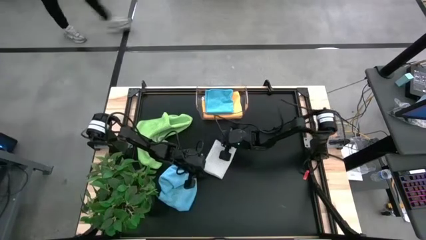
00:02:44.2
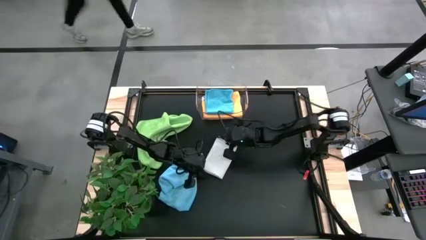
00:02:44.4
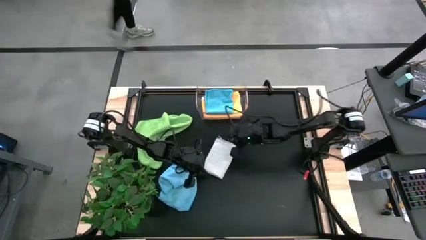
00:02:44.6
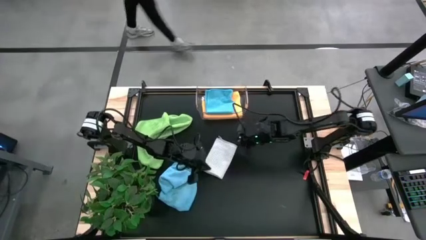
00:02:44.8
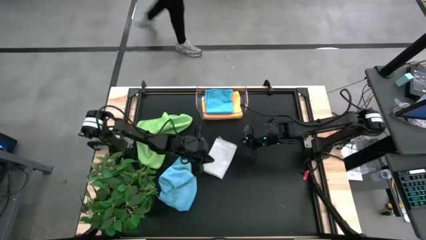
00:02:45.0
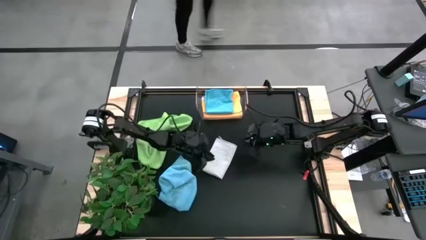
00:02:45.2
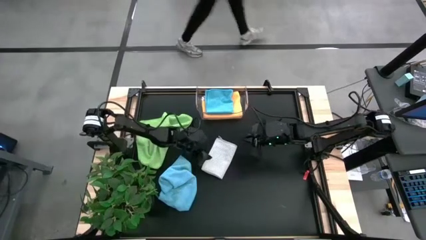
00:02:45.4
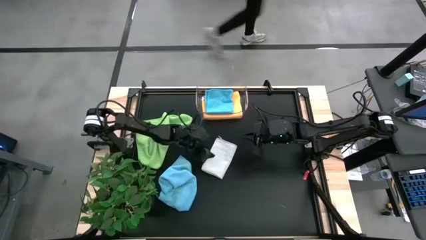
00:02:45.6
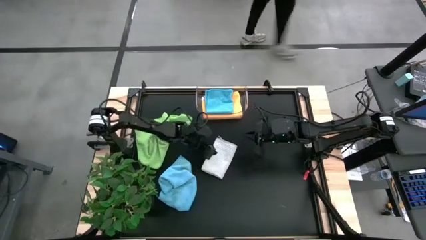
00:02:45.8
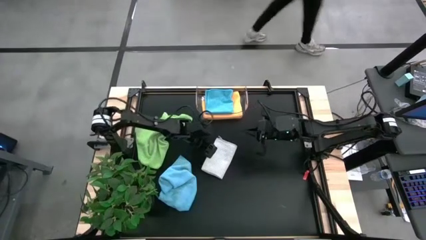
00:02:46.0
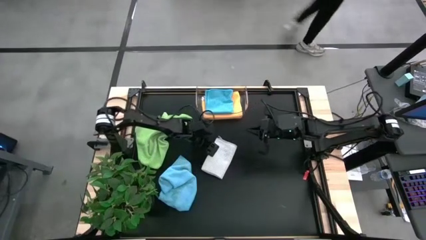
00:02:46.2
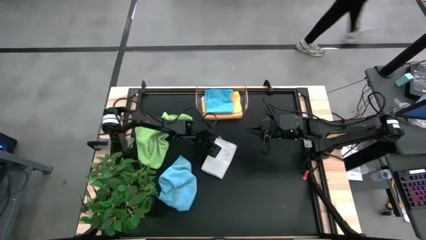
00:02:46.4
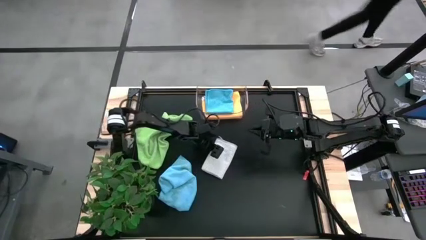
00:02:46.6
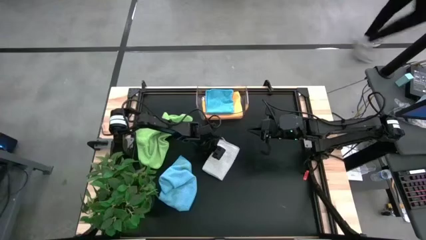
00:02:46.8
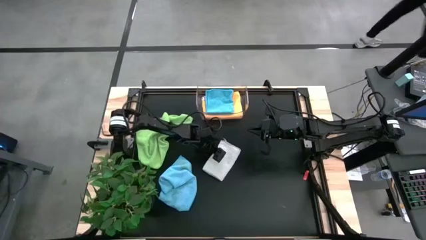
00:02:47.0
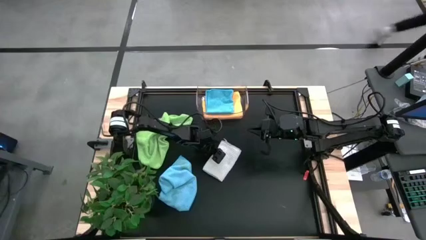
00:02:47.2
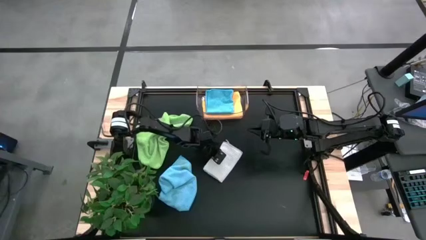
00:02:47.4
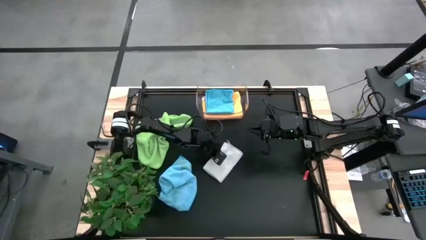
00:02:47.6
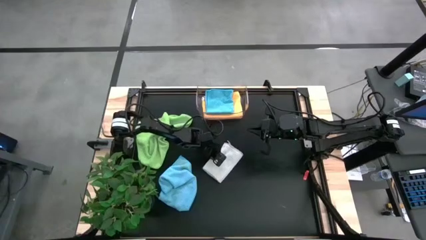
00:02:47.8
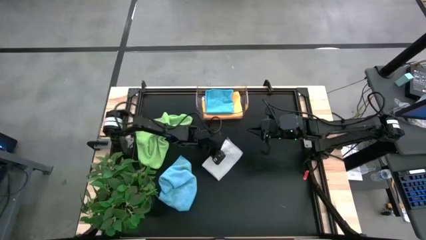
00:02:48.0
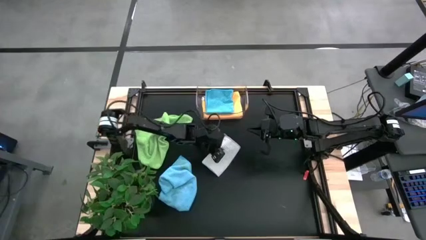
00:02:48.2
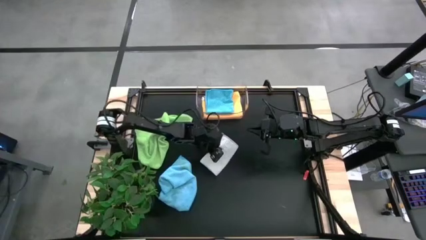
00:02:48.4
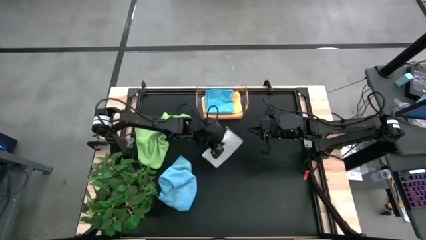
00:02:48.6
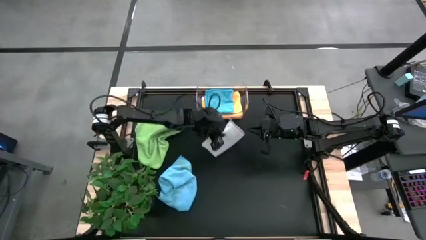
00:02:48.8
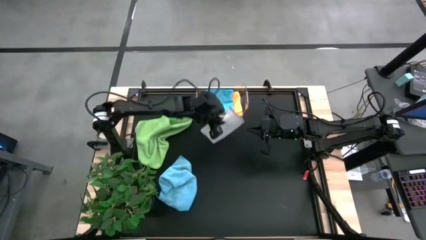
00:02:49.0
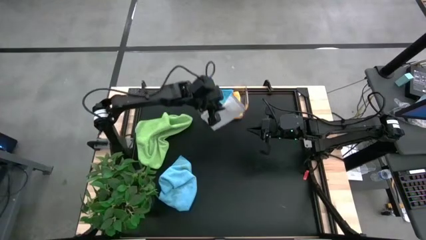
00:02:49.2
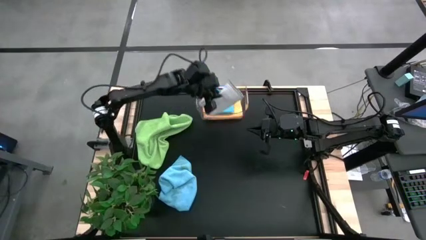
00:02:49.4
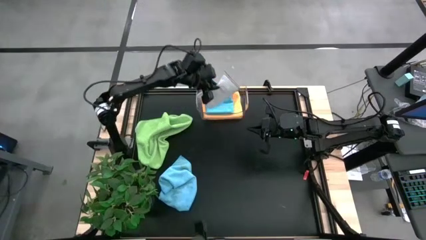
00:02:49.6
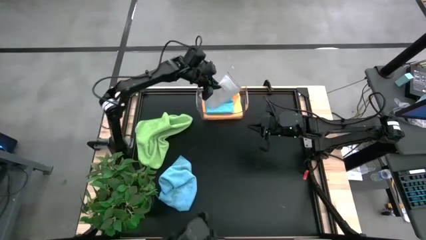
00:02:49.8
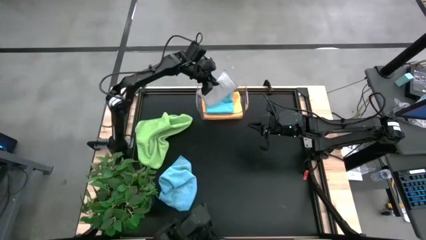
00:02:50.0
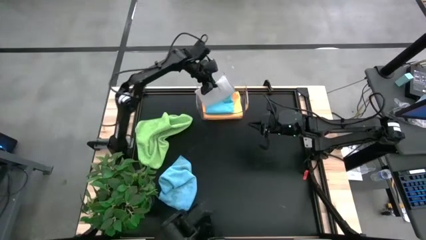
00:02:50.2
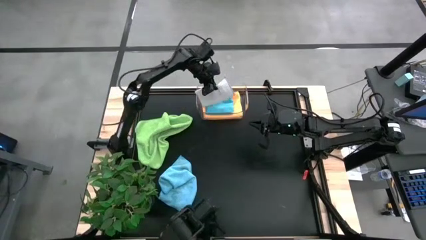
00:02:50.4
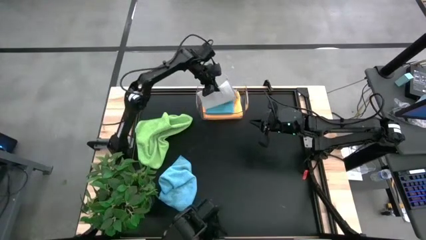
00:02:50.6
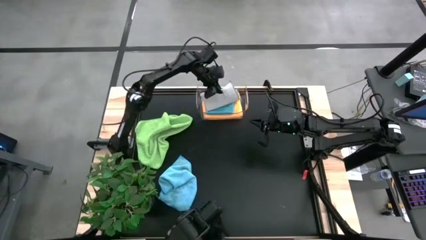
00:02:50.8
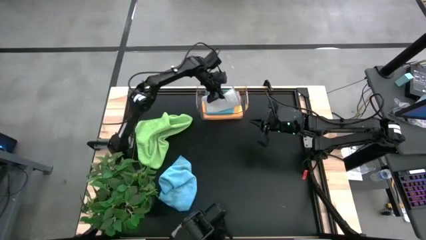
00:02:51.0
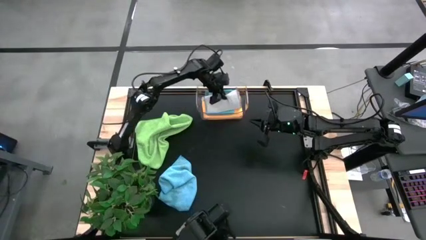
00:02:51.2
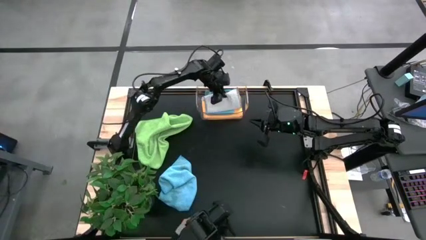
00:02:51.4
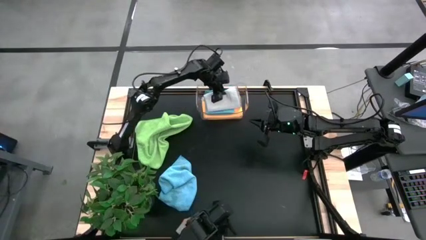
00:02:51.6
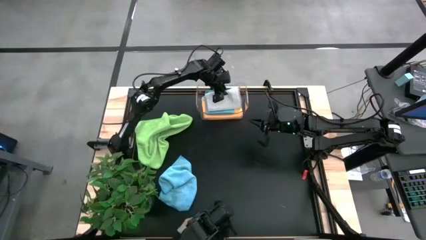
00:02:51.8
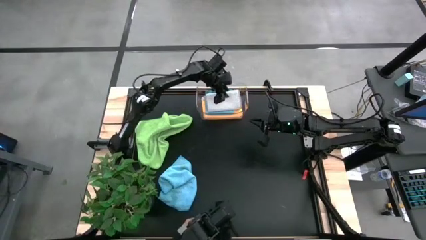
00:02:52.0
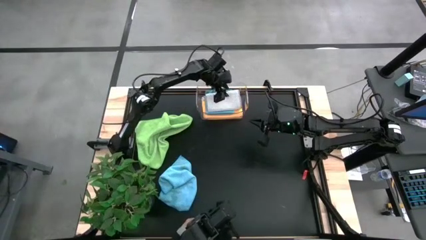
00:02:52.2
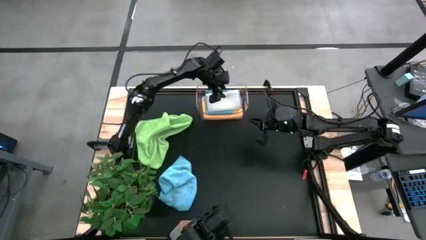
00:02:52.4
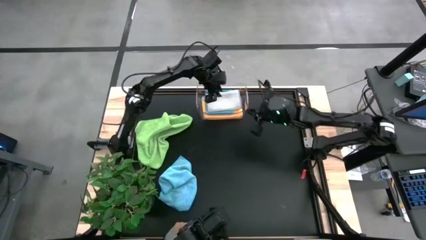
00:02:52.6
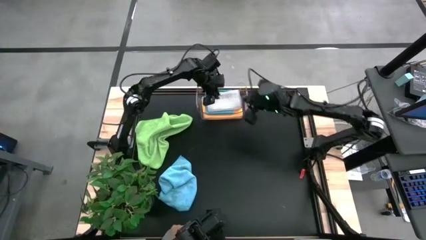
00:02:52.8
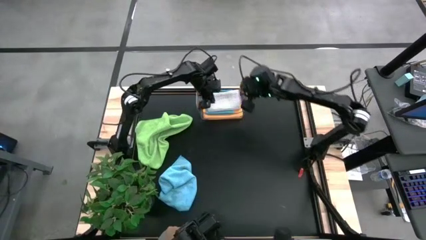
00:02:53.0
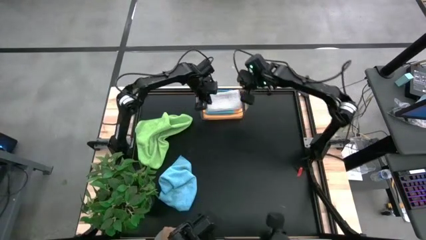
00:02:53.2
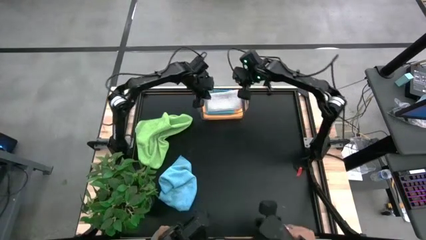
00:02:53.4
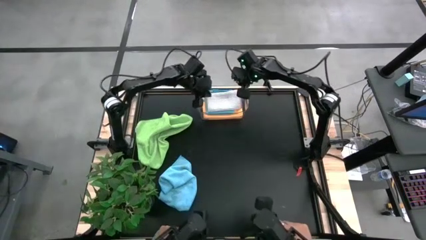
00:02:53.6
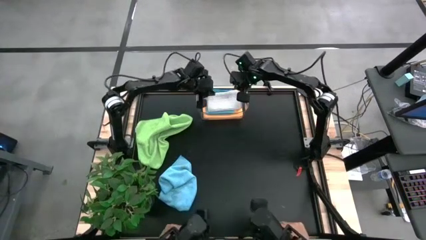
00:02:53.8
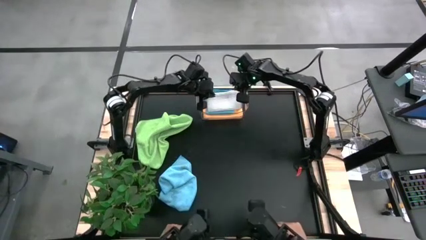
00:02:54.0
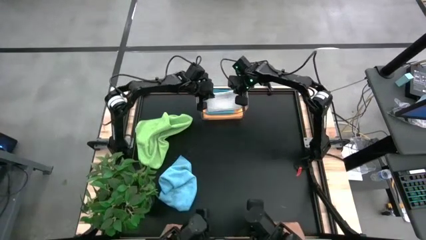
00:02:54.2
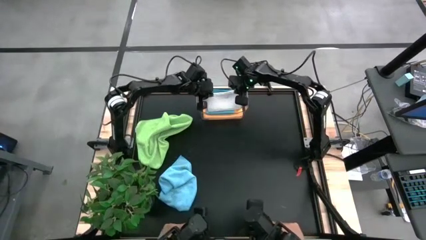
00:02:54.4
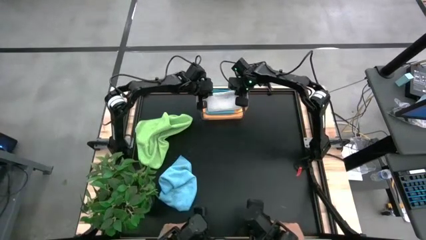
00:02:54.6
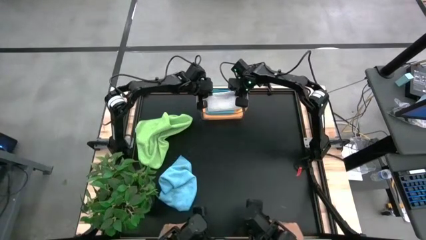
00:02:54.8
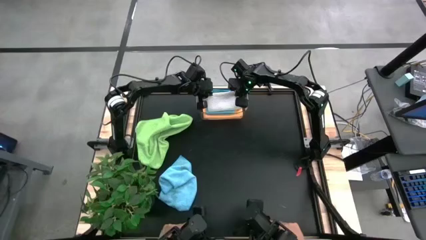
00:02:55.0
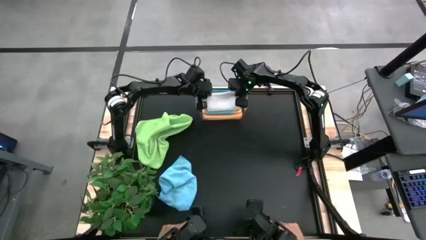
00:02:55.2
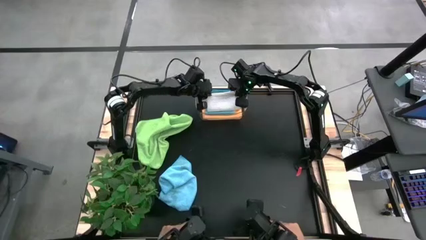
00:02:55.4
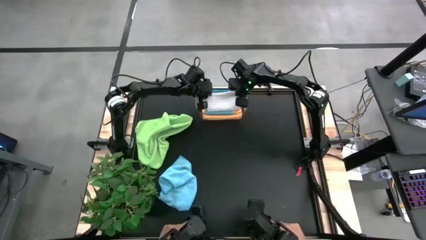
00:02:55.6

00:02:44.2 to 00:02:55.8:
Task: Fold microfiber towels
Put the gray microfiber cloth into the transparent bin

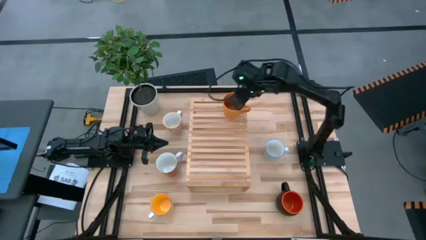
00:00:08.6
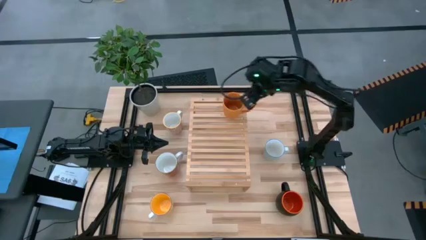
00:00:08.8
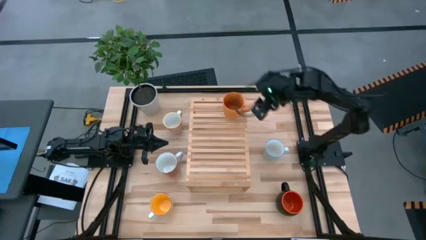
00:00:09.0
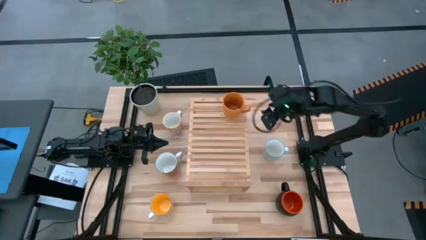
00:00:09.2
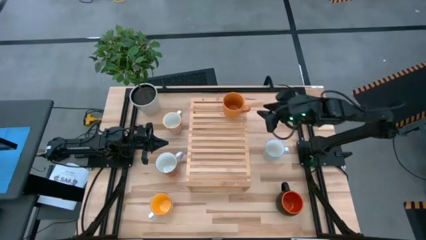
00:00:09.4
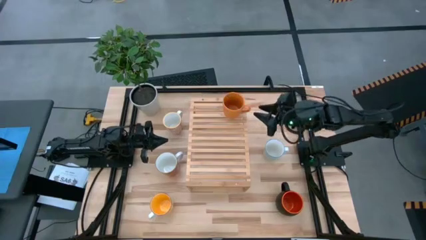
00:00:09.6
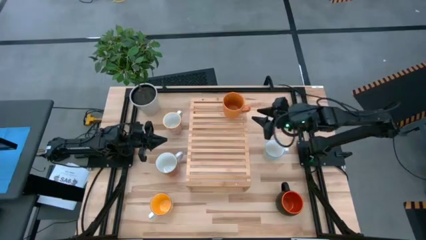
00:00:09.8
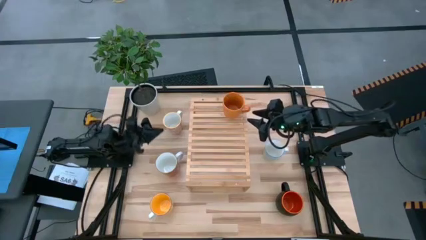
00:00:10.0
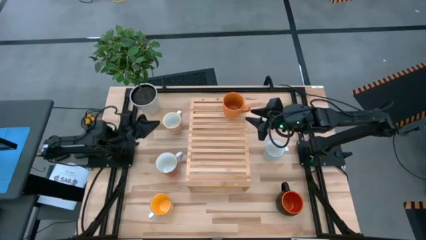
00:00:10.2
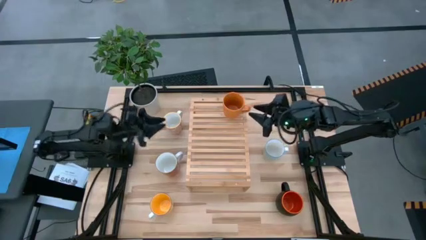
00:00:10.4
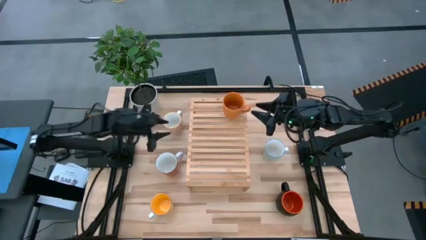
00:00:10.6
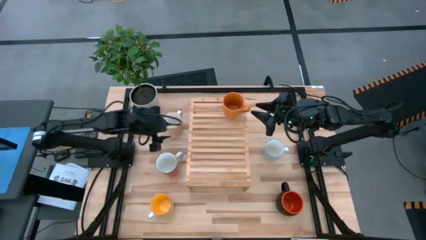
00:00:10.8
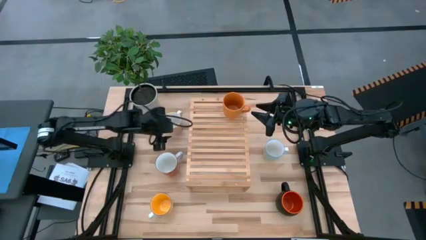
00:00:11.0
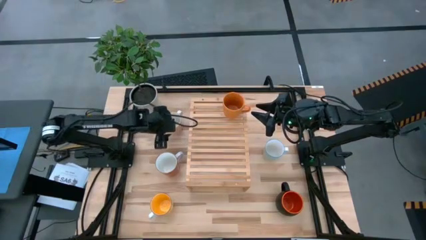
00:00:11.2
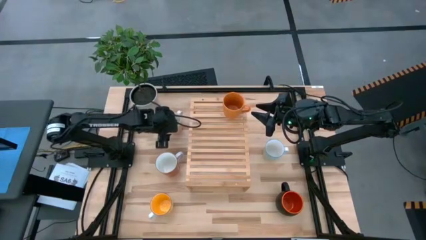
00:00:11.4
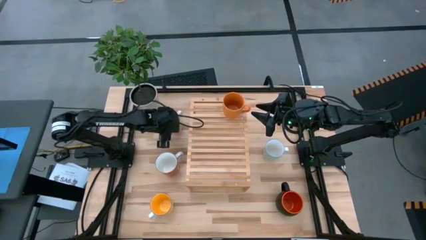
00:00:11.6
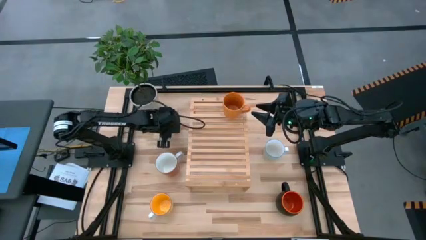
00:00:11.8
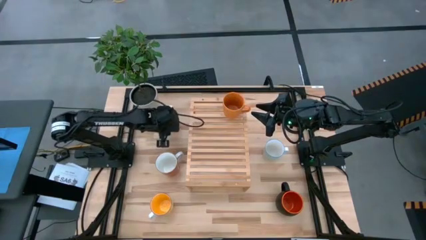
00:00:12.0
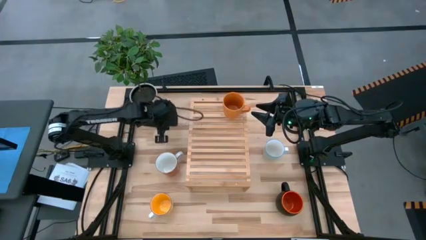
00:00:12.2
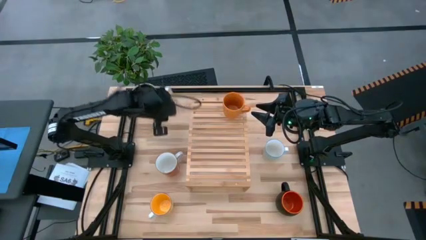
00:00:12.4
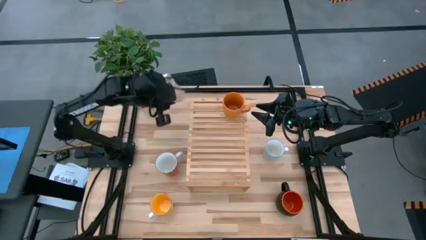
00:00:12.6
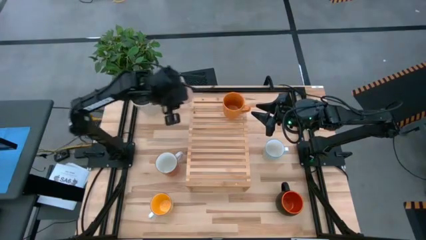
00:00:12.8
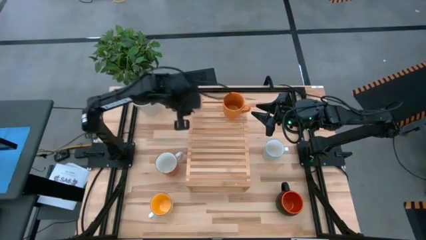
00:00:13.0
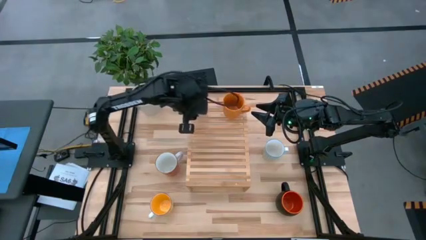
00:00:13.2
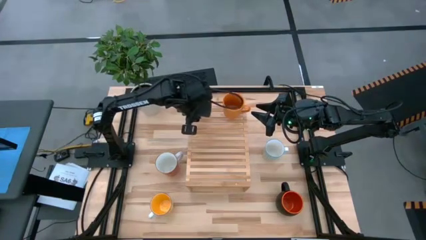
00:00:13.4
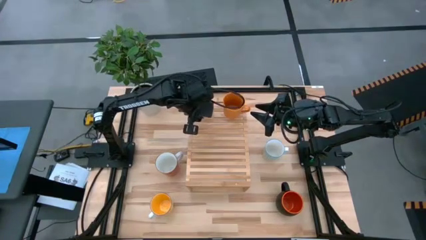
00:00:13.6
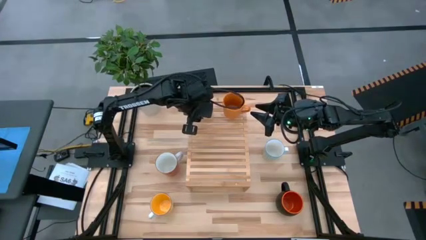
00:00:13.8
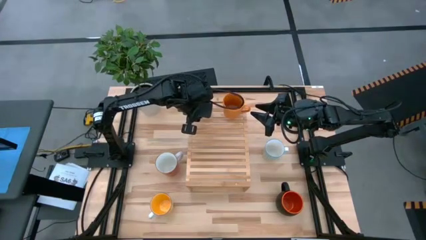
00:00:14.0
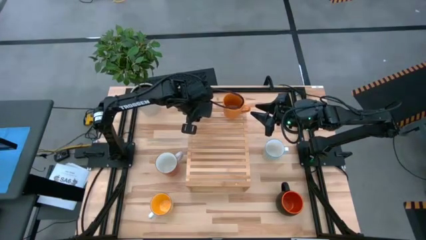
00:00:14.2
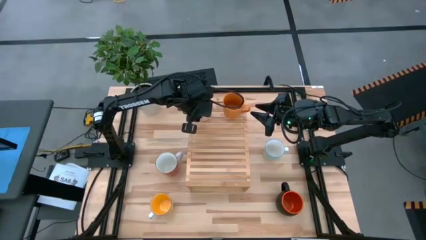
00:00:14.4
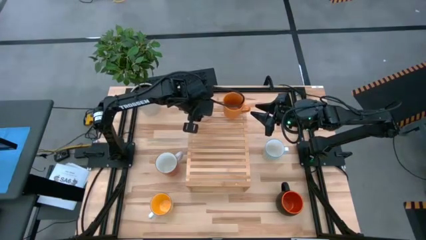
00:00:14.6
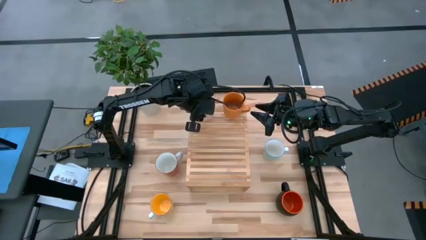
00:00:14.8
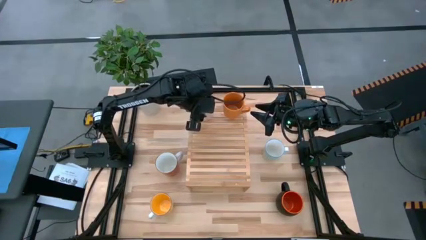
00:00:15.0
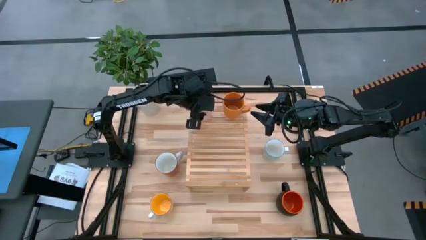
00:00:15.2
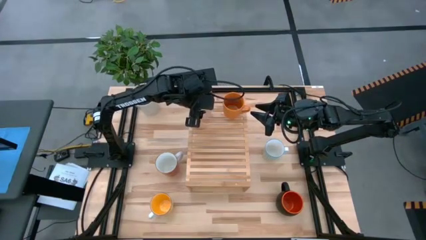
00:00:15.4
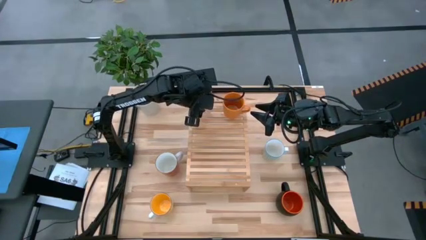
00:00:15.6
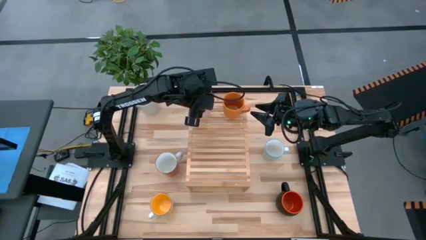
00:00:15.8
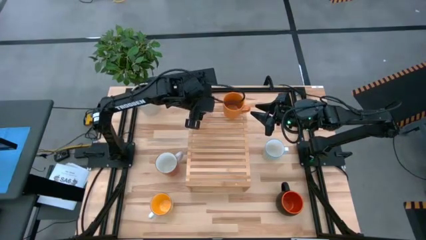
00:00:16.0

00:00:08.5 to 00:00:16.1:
Task: Place coffee mugs
Put the orange cup on the shelf aligned with the other orange cup
